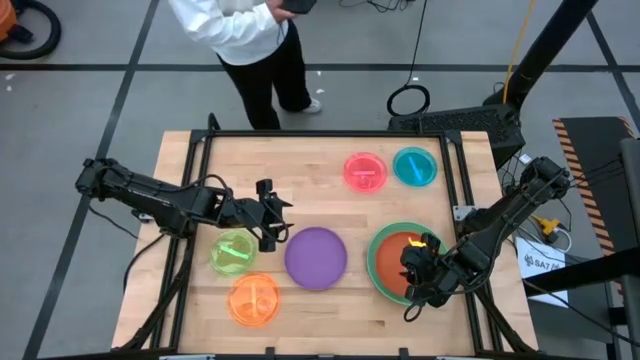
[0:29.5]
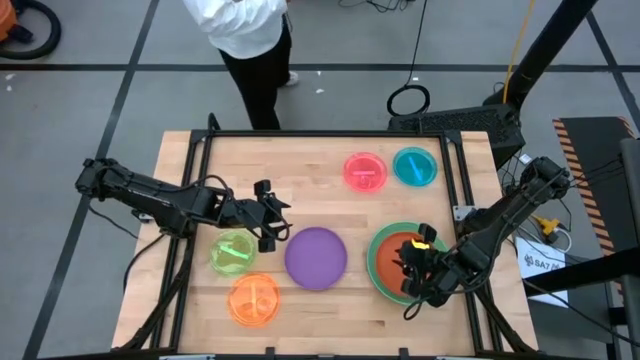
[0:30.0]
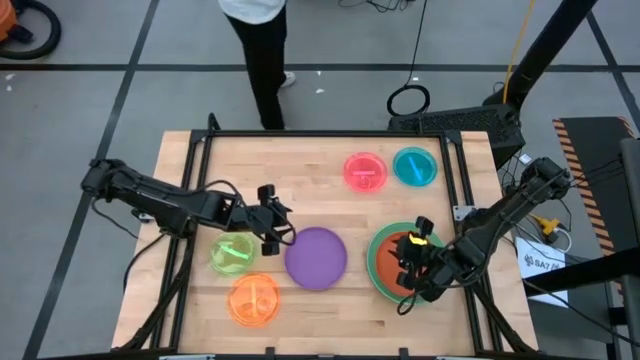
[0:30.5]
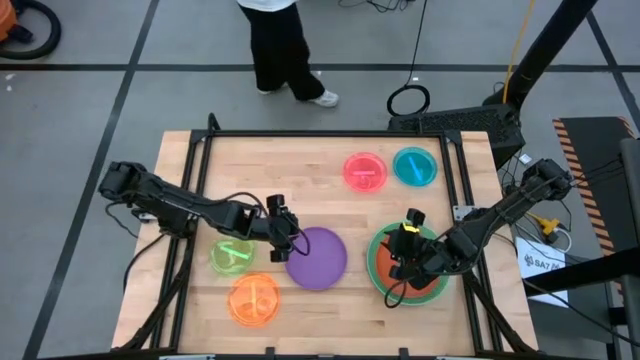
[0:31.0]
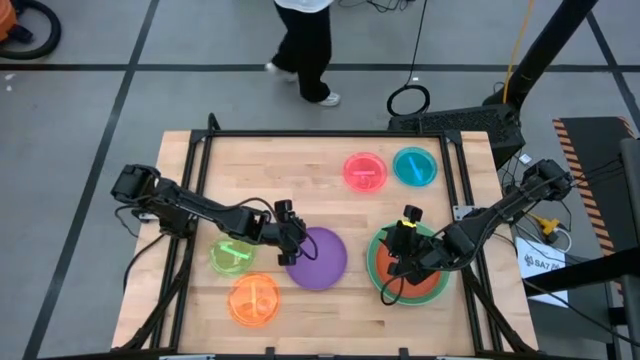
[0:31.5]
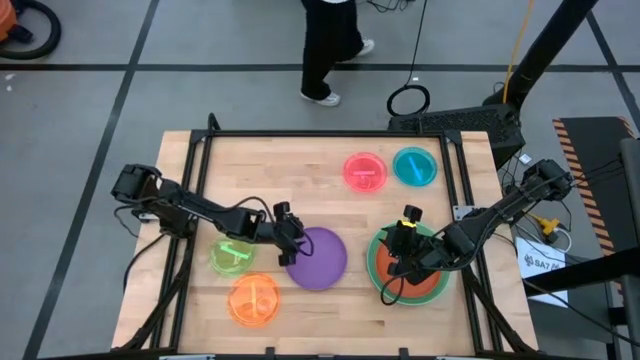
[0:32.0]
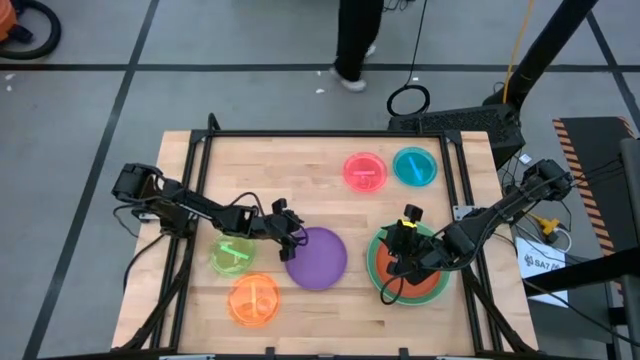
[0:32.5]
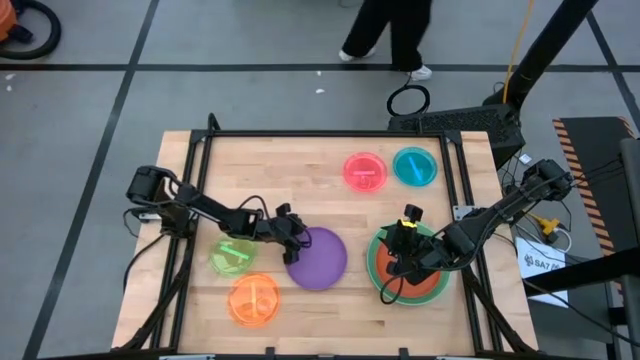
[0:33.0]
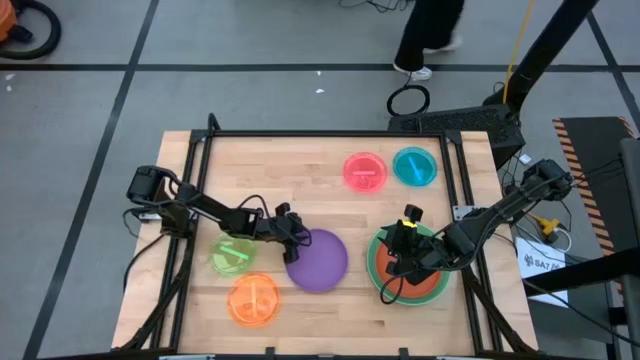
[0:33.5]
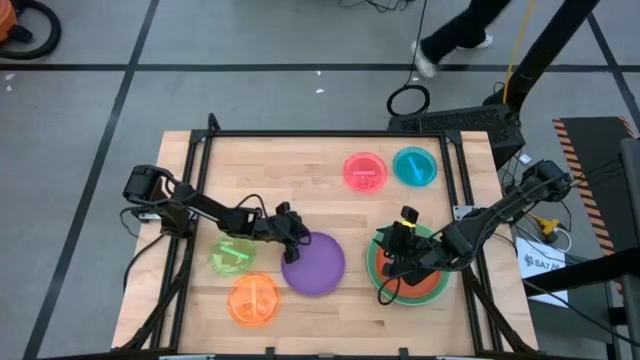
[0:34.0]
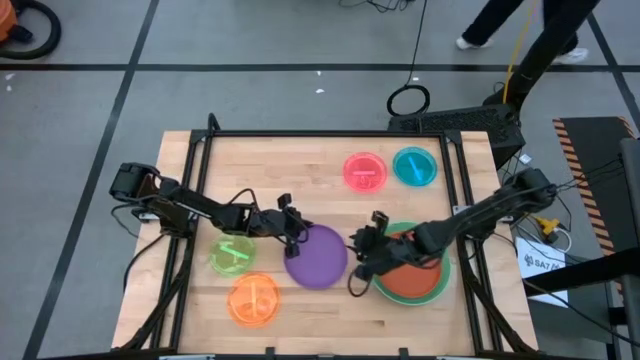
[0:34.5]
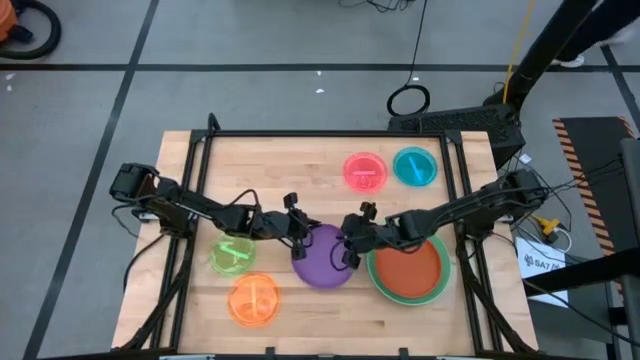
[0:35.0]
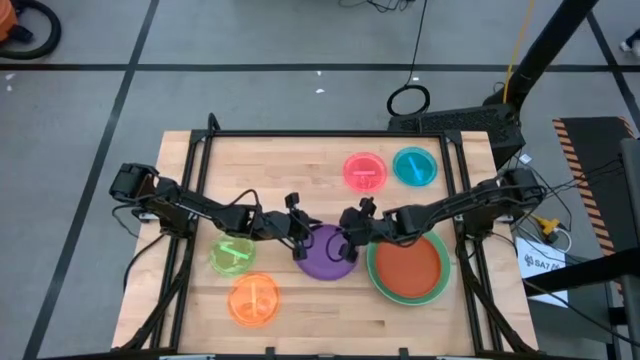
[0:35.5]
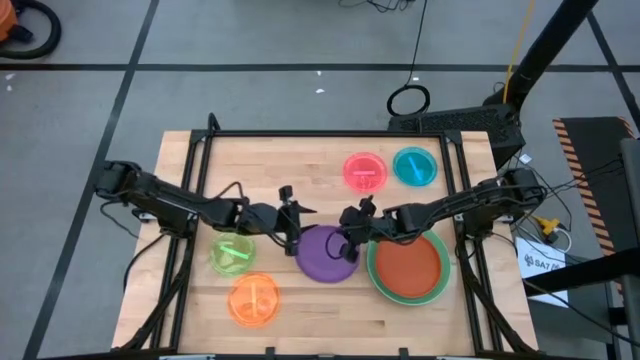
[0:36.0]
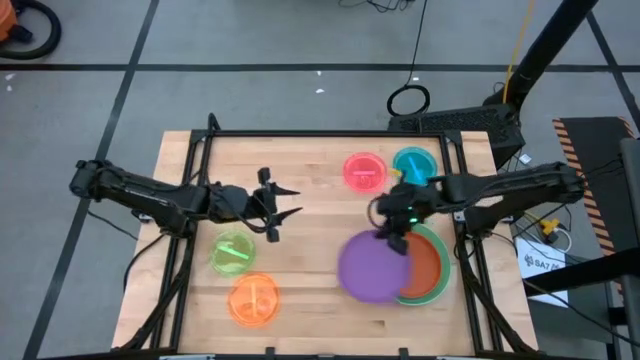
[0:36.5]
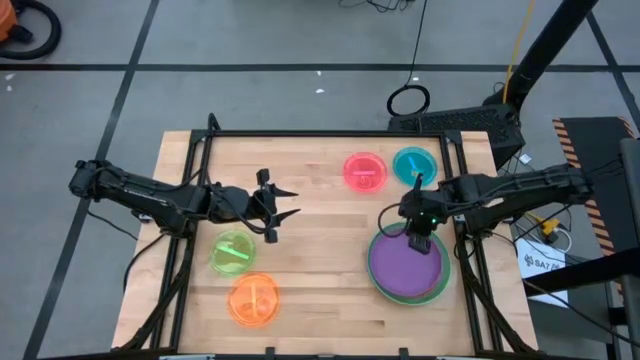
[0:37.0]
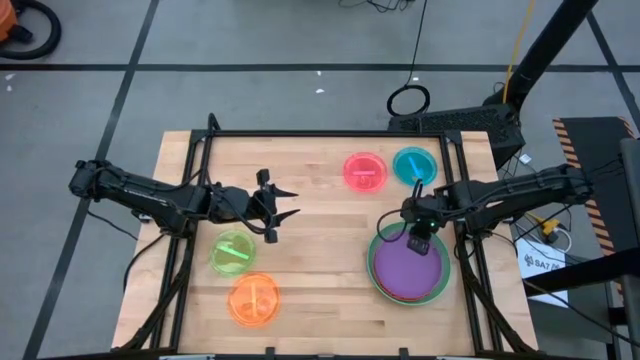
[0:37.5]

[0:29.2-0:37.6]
Task: Stack plastic plates
Stack the purple plate on top of the orange plate

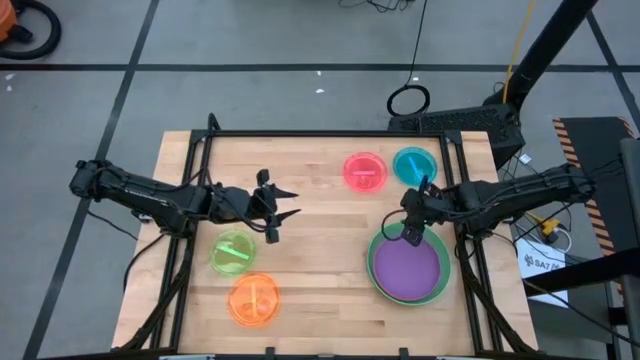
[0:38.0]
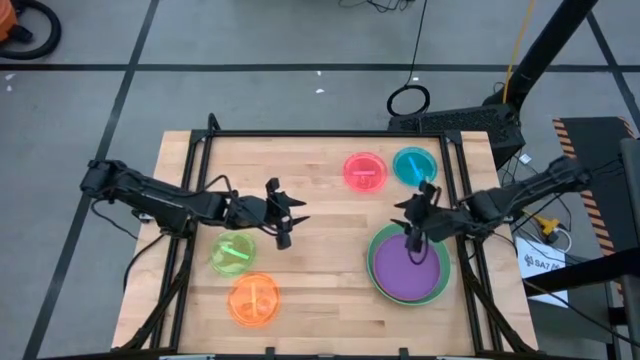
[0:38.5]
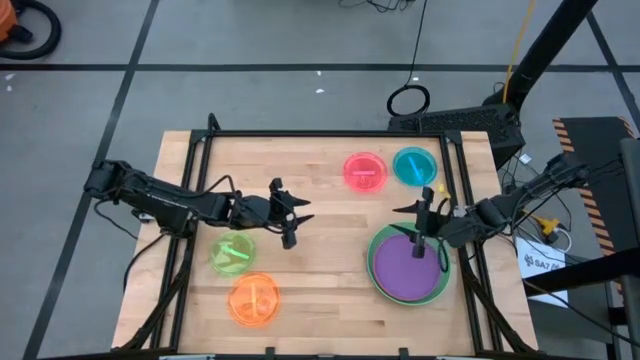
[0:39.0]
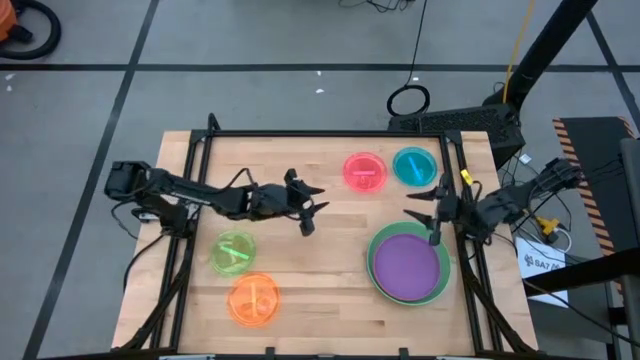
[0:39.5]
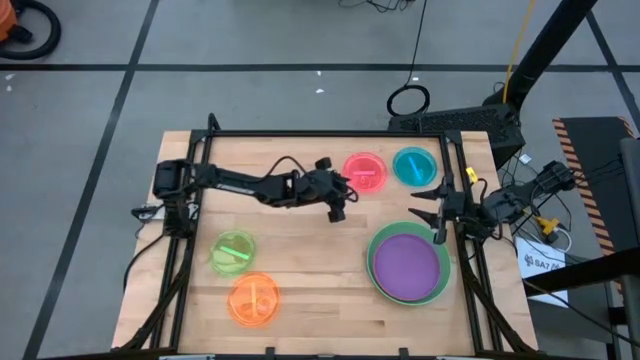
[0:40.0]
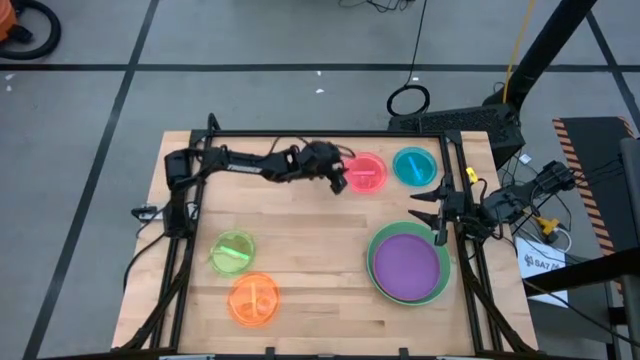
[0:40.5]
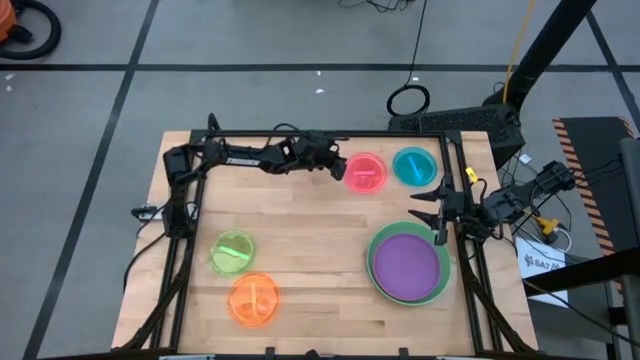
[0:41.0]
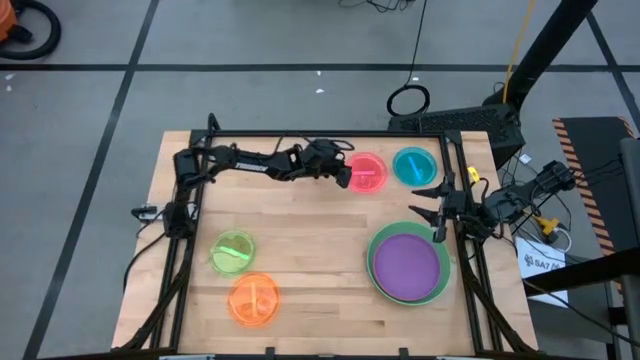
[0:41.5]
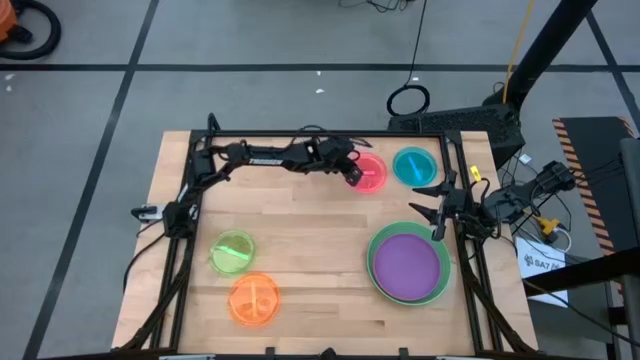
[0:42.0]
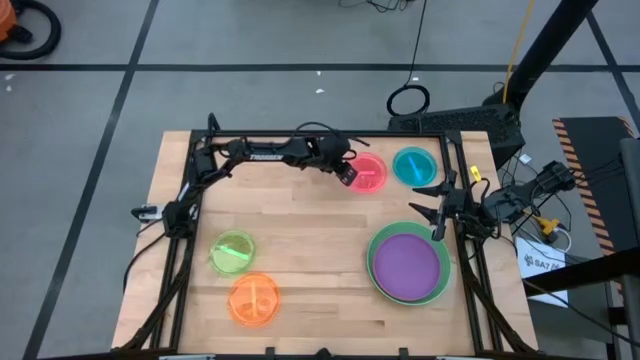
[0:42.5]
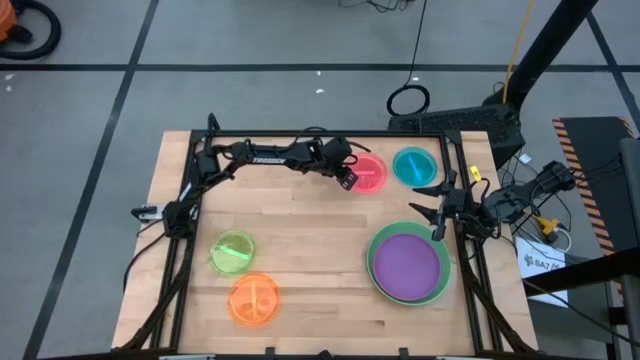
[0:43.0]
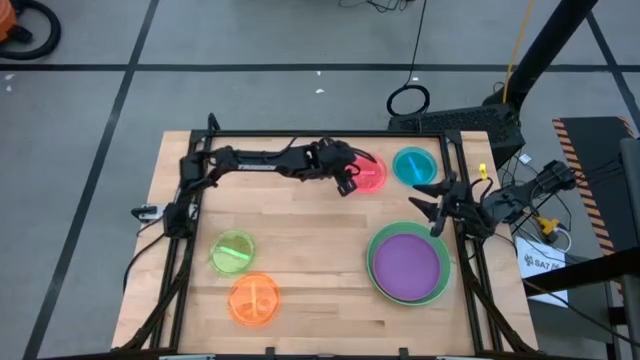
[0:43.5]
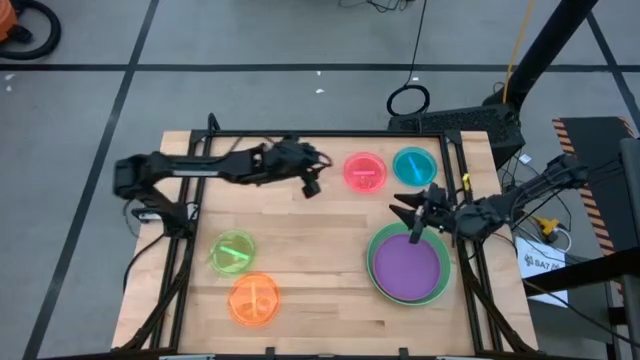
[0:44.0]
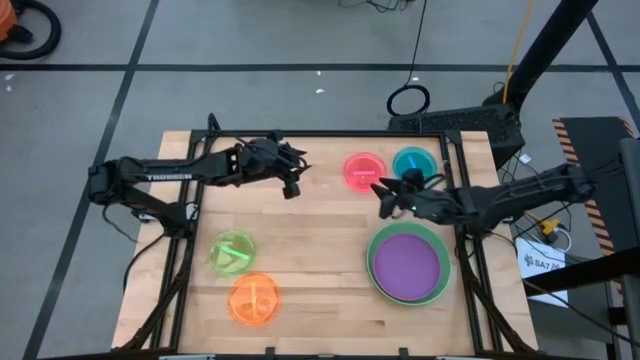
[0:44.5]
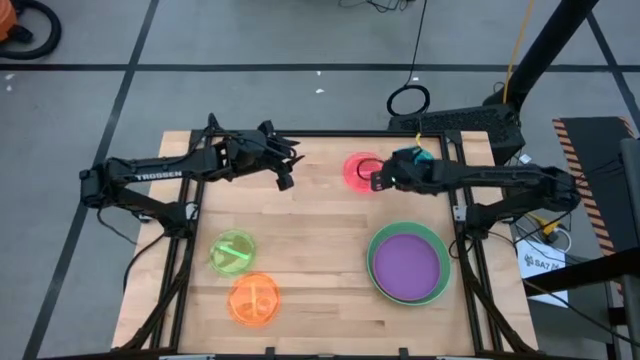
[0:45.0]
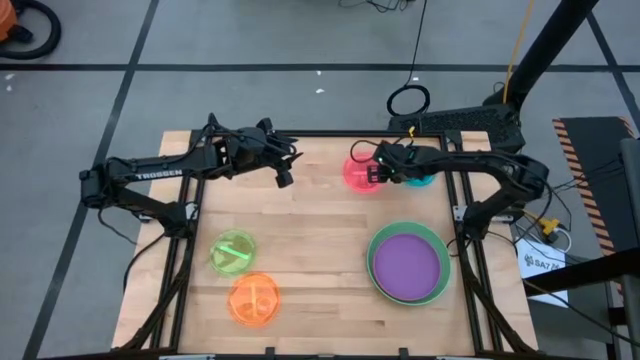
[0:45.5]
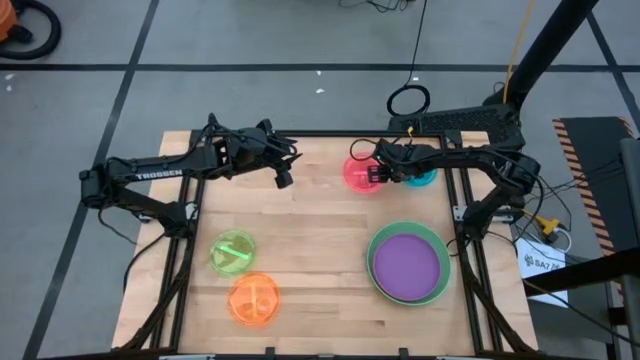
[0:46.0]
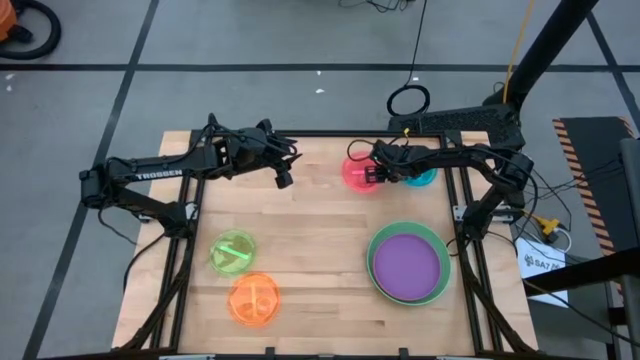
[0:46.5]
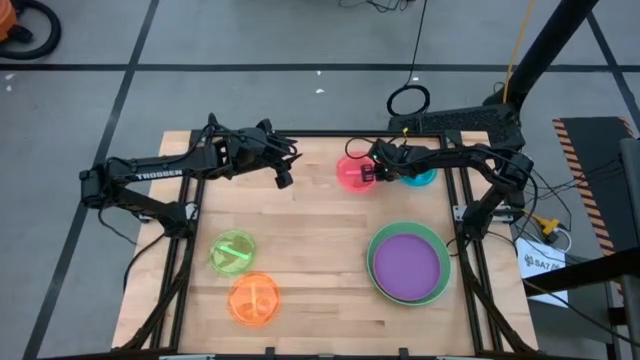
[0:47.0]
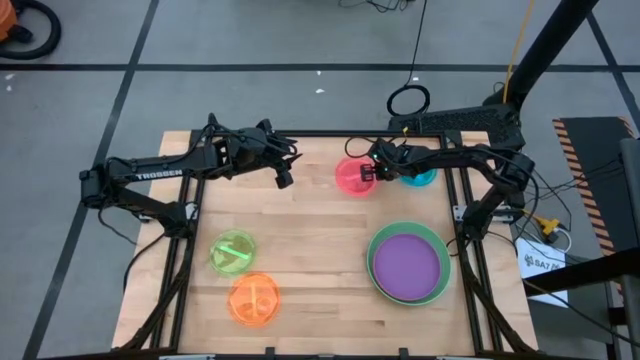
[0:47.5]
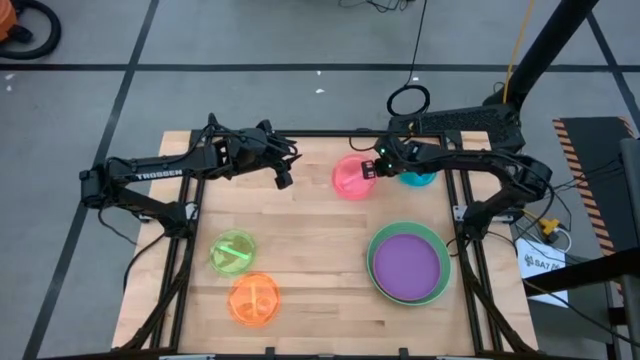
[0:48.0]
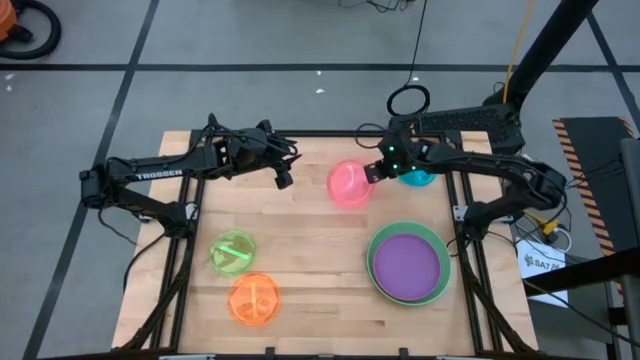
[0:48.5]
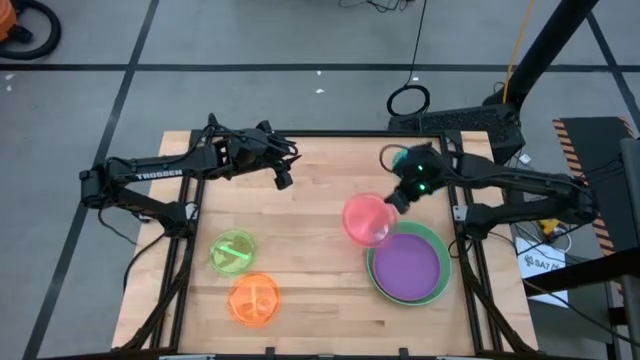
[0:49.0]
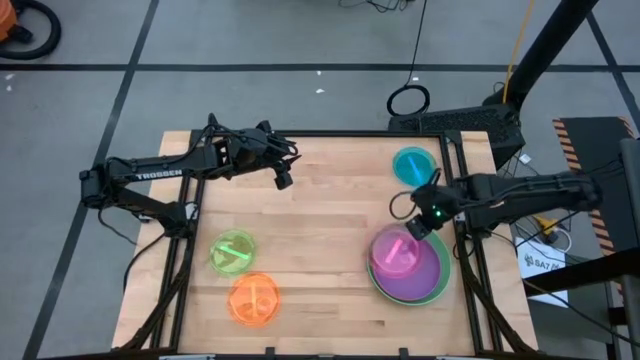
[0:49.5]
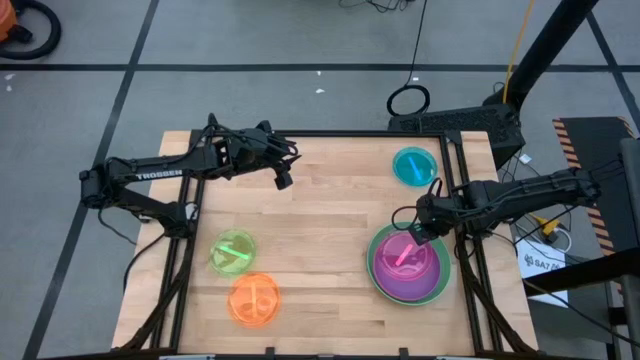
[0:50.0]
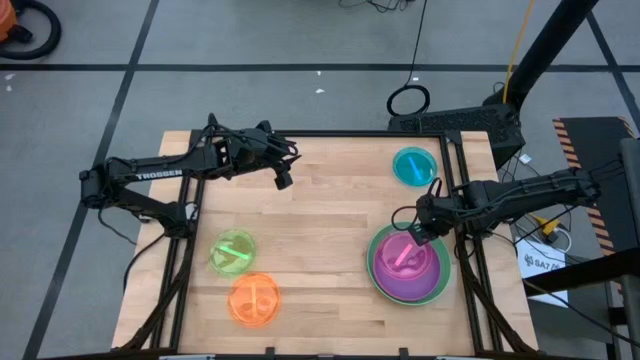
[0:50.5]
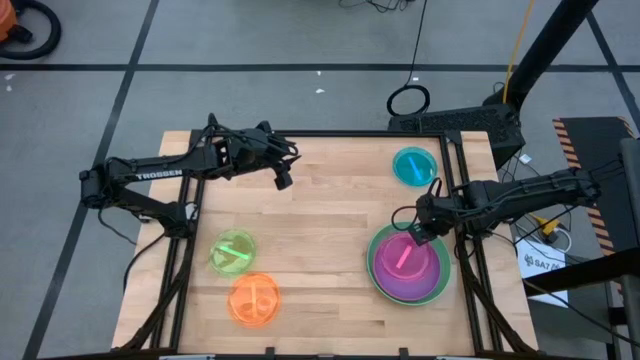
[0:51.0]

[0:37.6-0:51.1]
Stack the small pink plate on top of the purple plate
